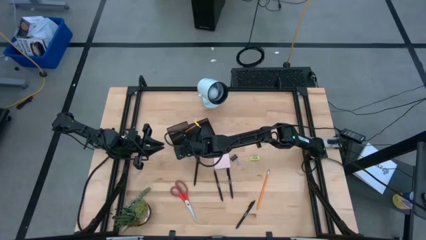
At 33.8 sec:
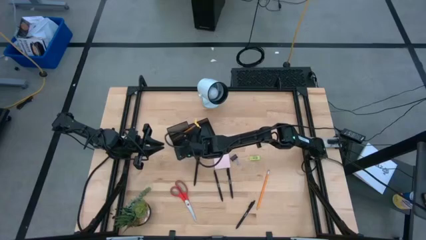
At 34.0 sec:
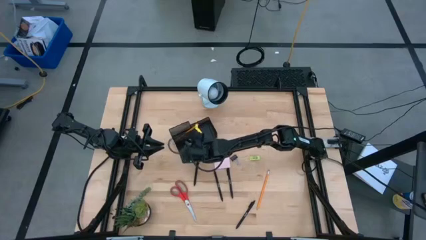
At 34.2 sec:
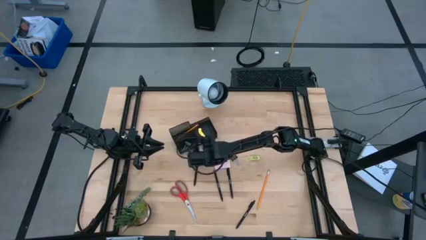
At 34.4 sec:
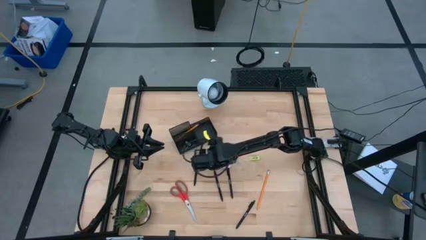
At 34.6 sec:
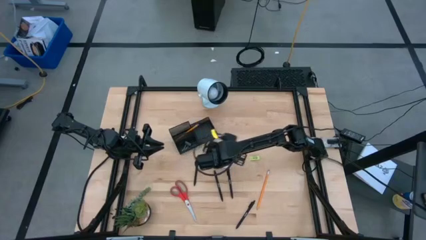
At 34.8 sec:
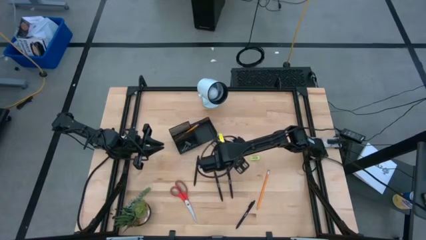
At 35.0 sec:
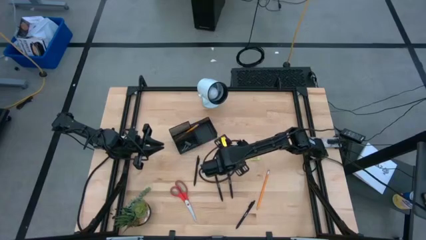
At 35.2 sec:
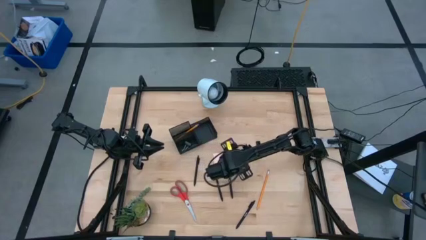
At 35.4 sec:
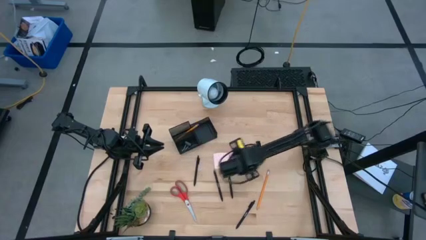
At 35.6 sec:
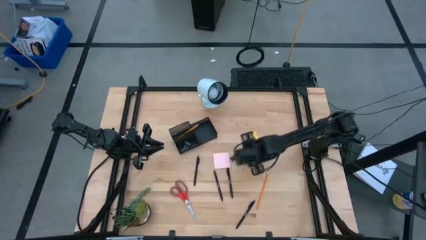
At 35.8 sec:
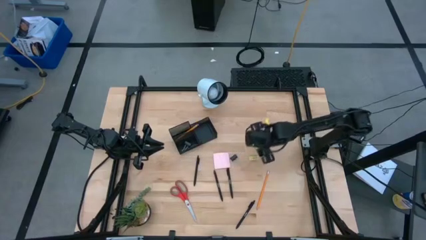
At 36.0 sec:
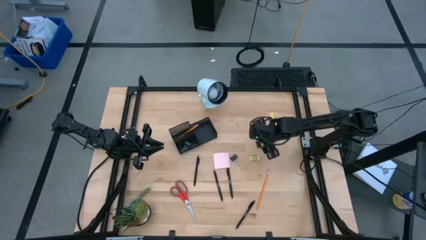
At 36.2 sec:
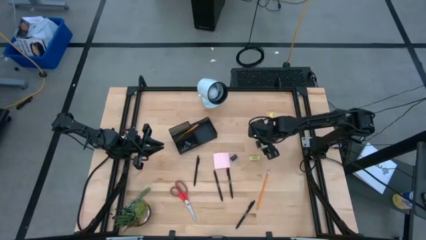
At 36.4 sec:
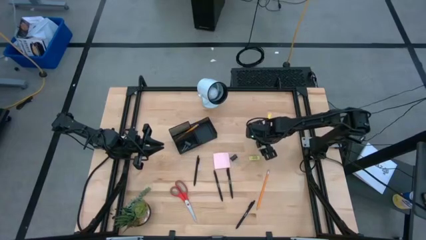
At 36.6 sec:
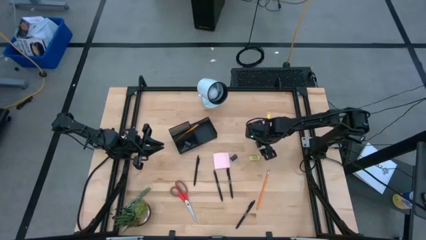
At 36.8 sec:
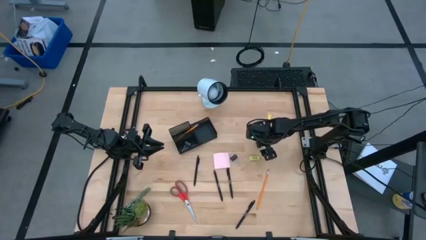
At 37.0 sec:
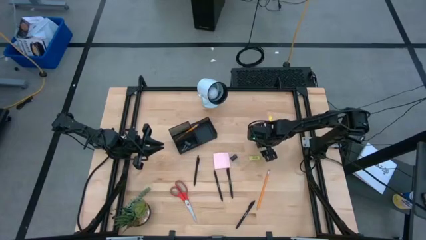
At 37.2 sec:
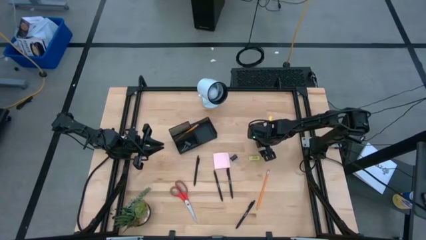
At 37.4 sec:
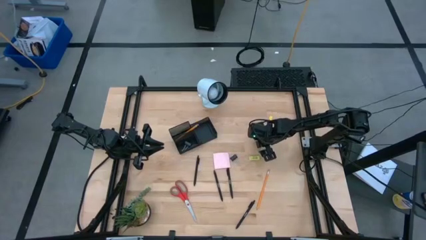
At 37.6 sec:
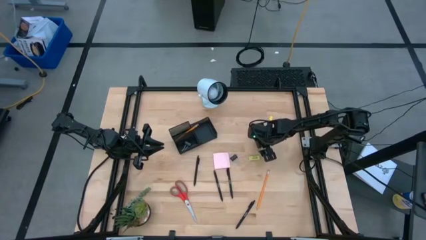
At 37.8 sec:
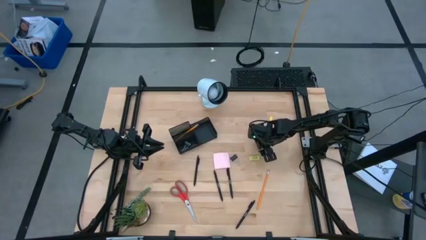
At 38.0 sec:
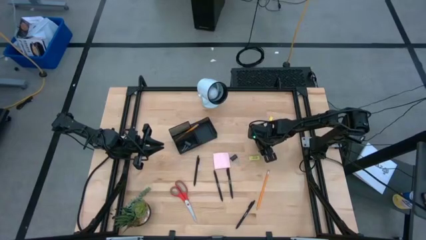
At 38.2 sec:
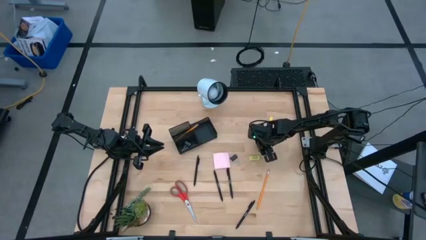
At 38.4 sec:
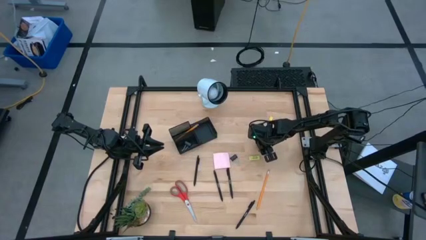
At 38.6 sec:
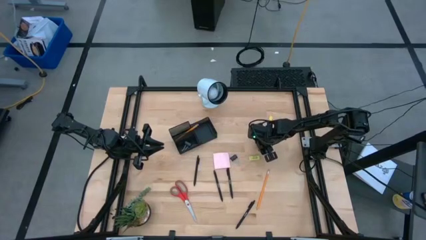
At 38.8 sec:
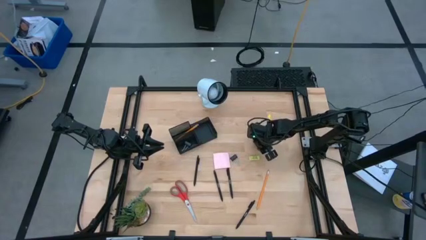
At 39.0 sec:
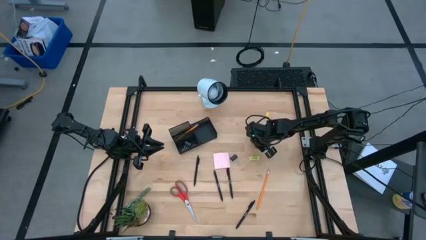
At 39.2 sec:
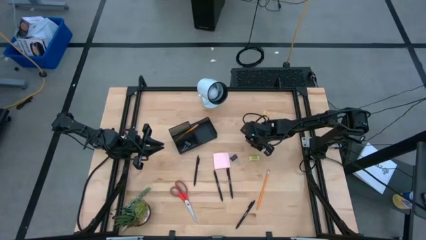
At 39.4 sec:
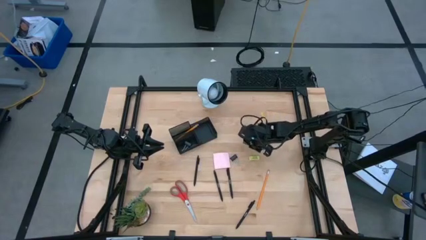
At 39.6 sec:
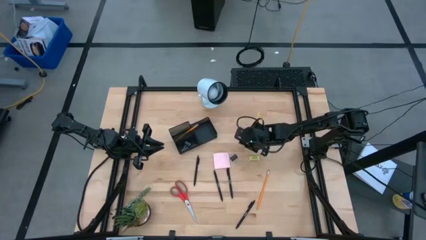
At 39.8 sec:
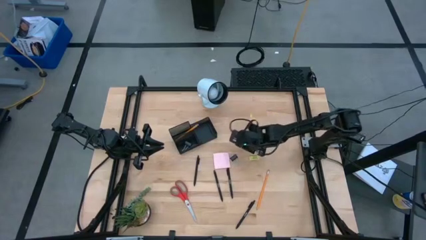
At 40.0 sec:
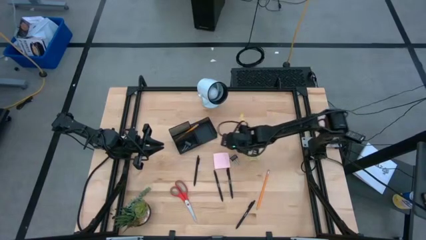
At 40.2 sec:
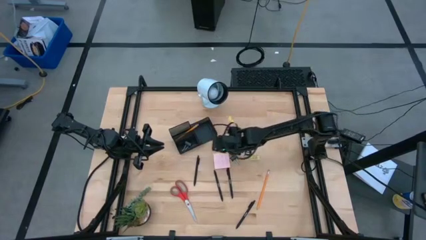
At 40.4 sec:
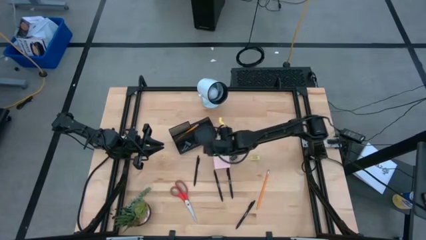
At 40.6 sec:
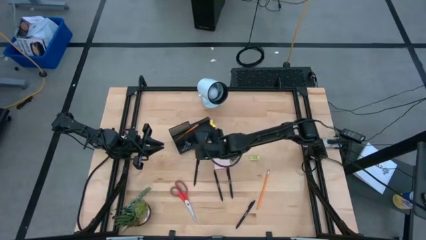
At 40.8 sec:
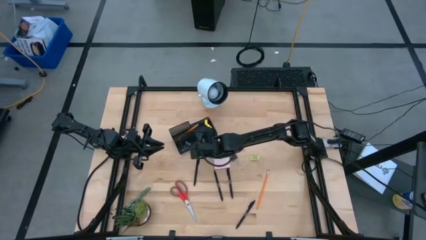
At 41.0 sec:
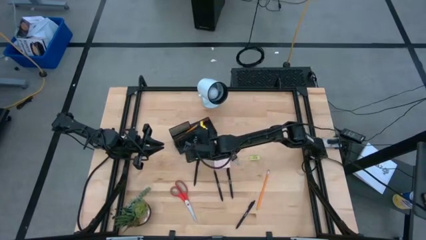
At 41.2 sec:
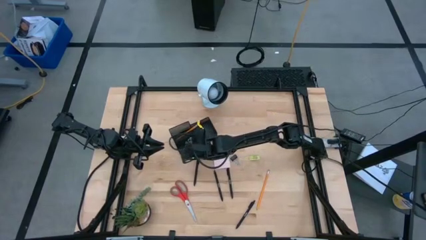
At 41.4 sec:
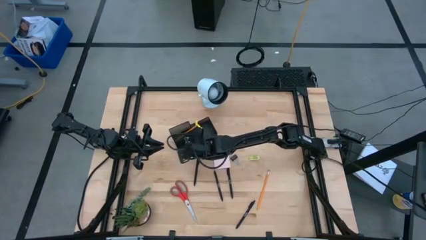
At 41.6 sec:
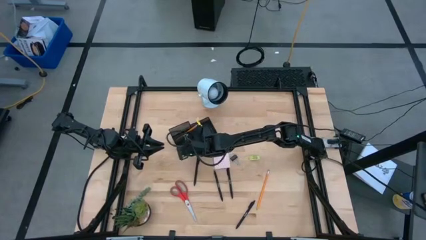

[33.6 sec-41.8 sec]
Task: Pick and place office supplies into organizer
Put the black binder clip into the black desk organizer

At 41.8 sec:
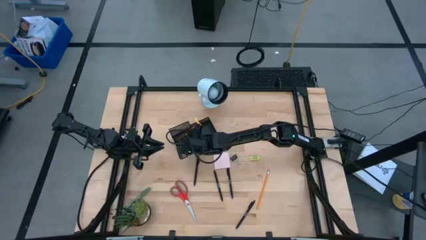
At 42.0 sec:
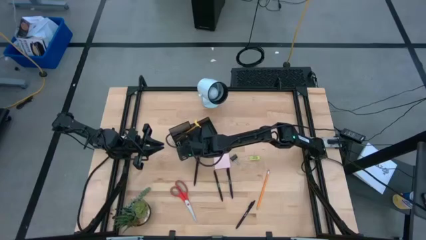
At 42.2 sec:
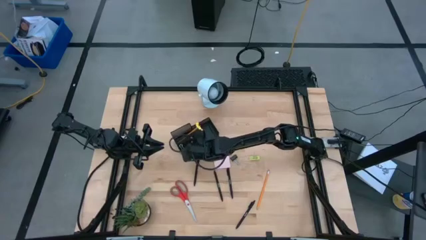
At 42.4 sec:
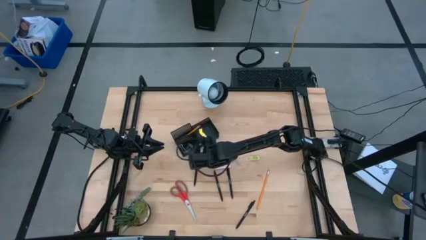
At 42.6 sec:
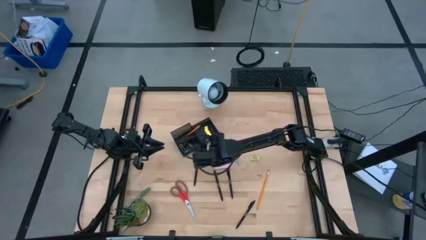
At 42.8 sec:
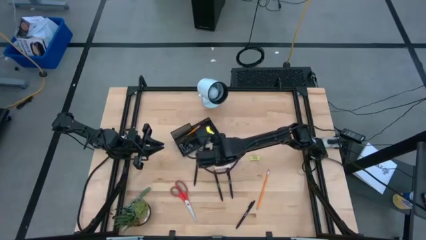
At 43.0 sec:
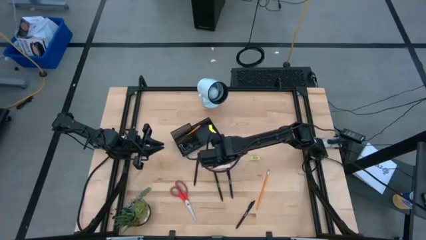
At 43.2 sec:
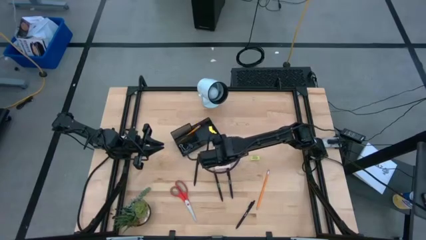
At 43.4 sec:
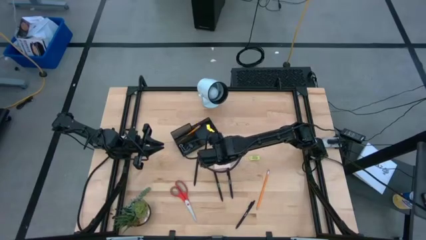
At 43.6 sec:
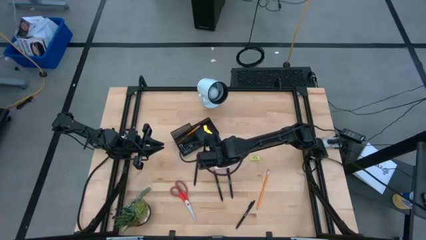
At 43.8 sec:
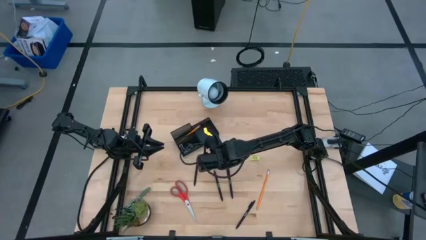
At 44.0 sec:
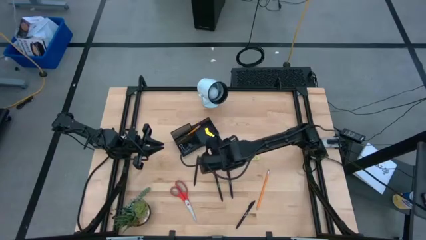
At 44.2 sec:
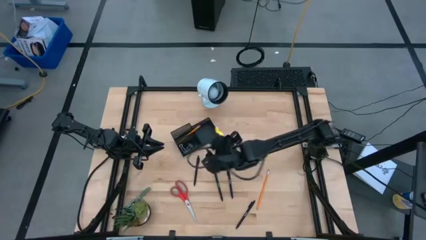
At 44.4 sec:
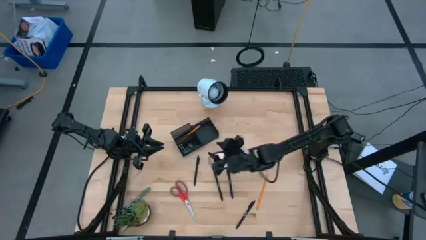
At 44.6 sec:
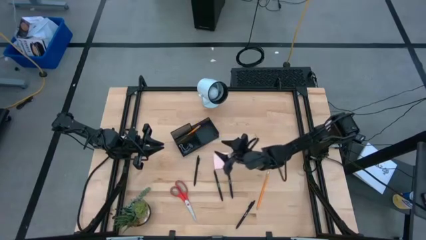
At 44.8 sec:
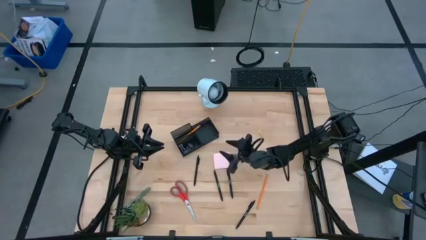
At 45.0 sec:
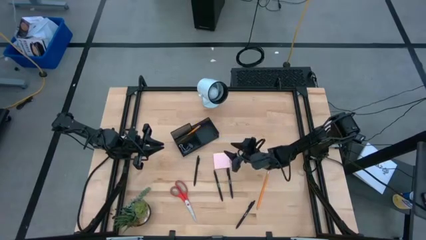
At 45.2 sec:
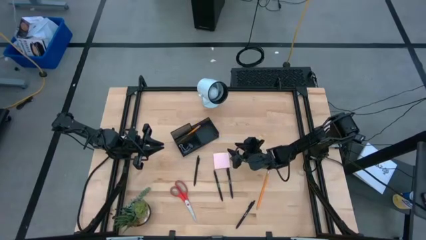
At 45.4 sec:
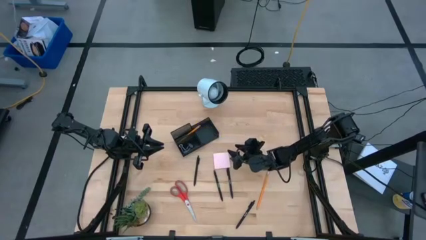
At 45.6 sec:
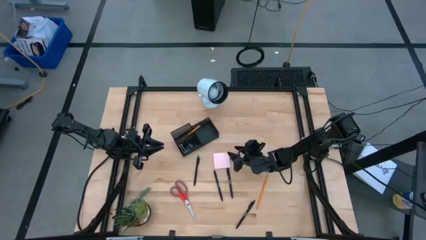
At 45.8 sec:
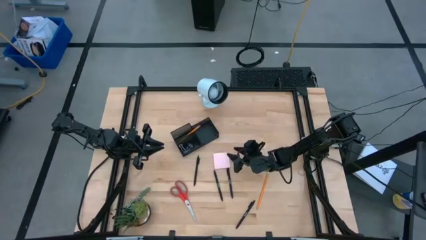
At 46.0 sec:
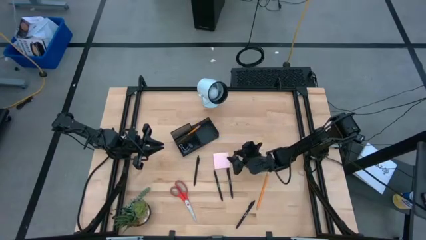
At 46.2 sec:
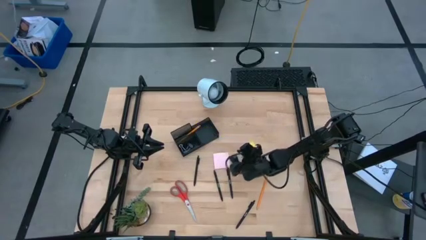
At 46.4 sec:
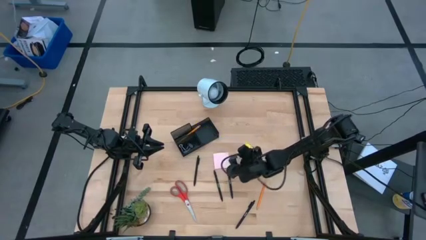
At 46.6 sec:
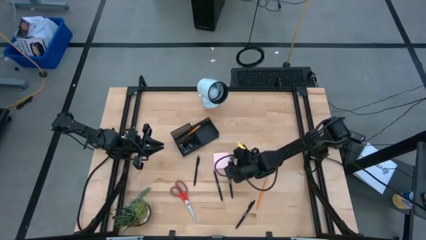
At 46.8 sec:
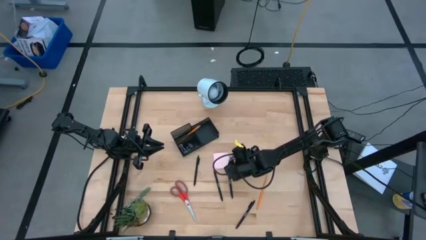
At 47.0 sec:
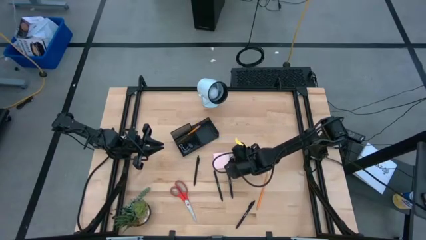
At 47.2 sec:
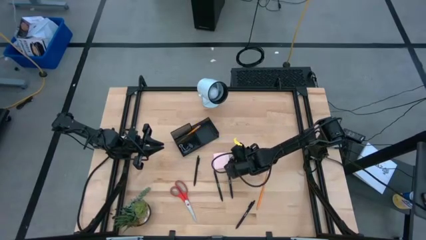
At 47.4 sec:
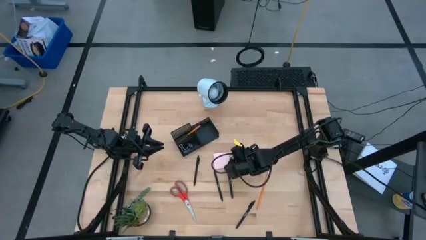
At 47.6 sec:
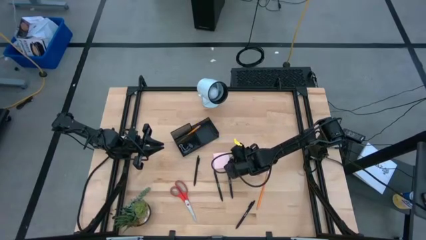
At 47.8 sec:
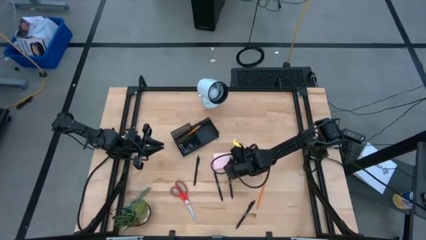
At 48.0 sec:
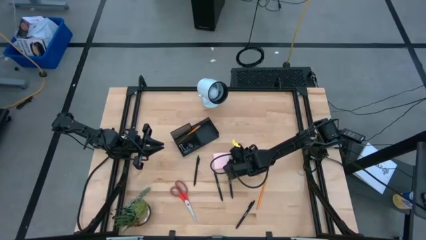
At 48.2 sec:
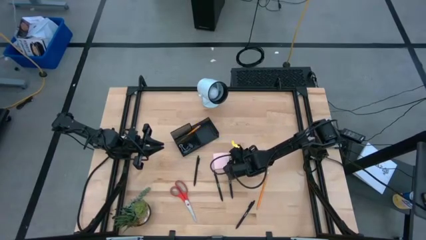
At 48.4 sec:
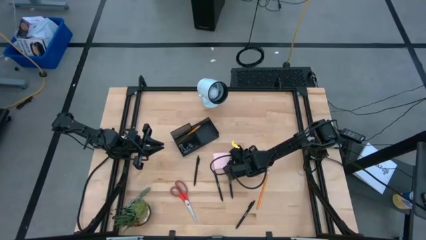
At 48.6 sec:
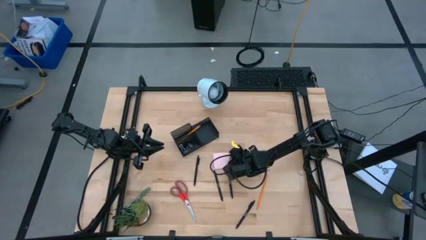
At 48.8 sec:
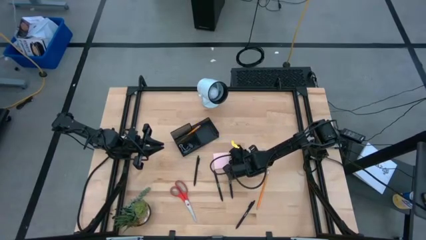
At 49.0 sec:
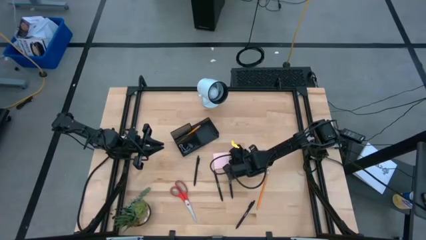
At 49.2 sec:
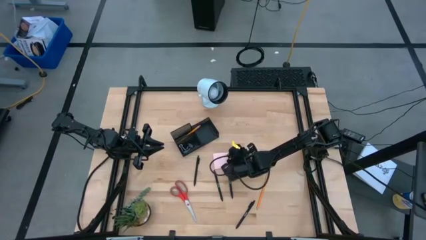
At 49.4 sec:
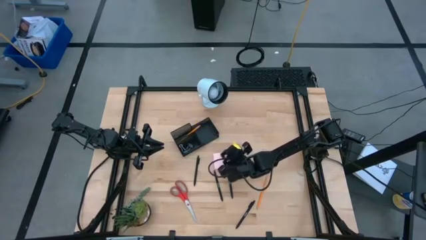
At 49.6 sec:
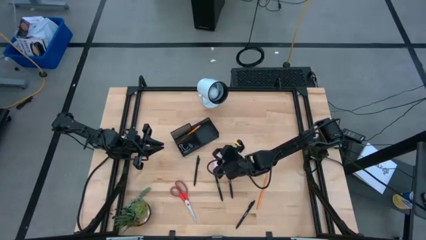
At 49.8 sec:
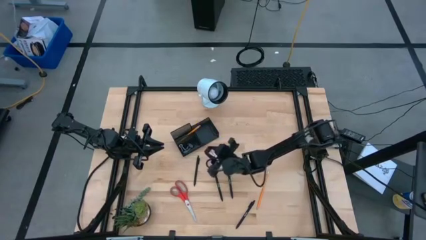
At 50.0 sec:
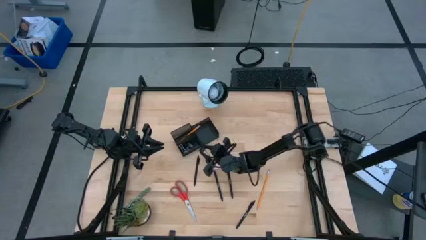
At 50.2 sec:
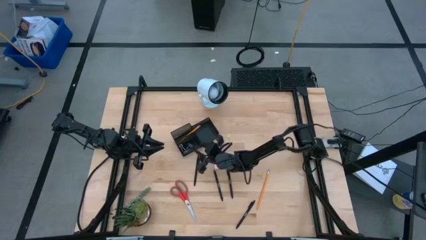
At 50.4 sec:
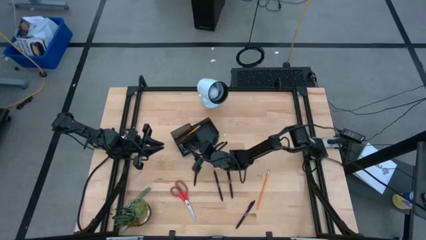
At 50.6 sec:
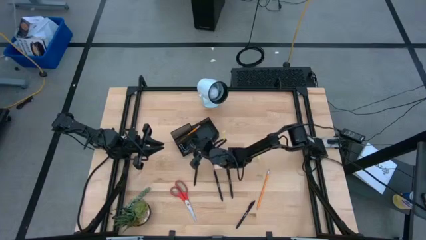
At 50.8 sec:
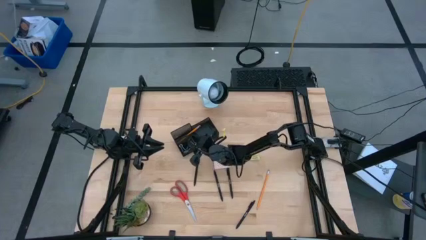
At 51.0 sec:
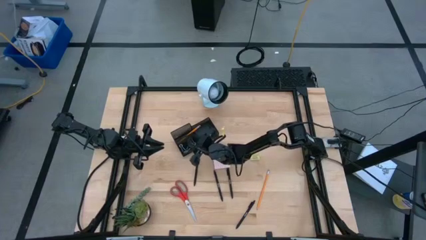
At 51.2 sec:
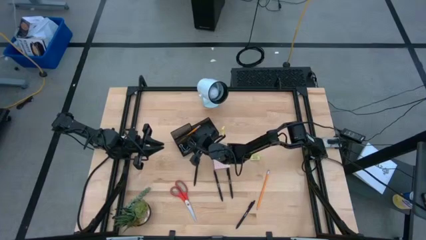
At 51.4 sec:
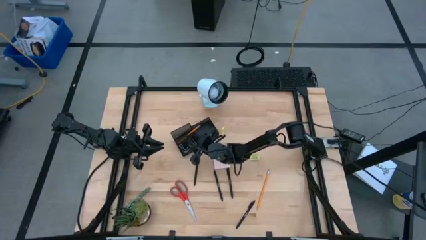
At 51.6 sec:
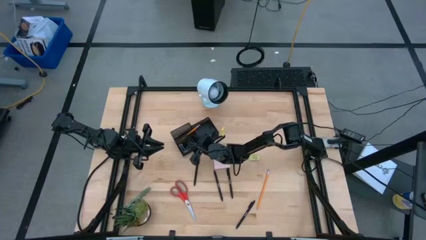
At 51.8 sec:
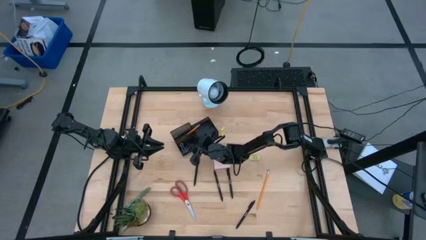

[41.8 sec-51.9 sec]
Put the black binder clip into the black desk organizer
